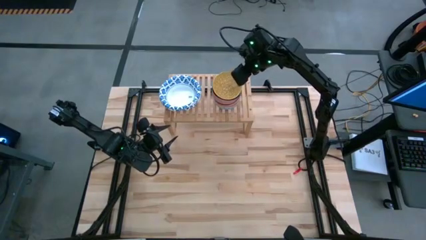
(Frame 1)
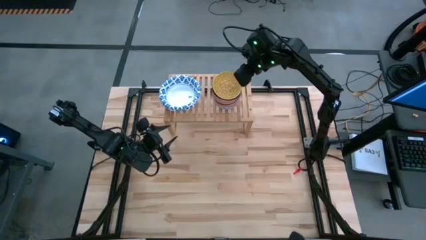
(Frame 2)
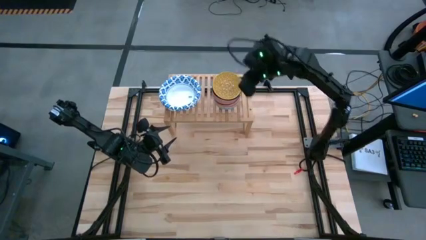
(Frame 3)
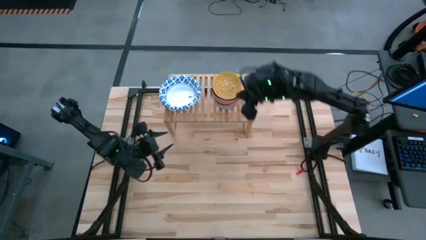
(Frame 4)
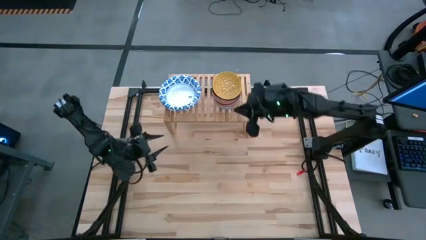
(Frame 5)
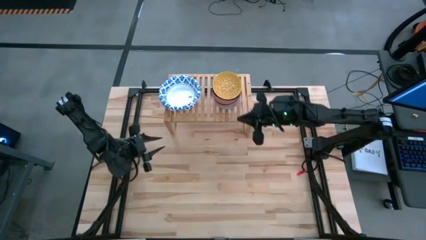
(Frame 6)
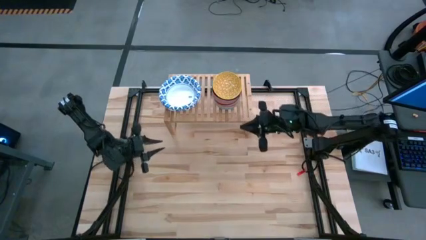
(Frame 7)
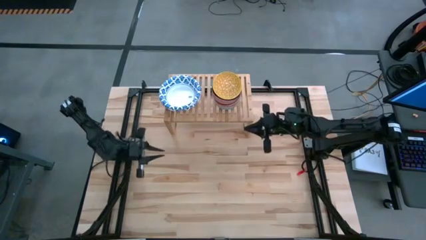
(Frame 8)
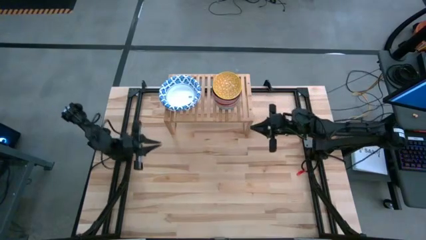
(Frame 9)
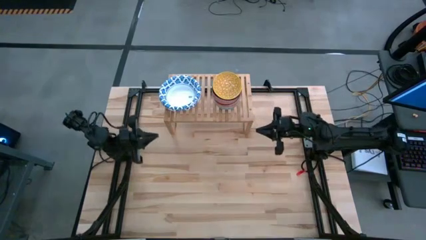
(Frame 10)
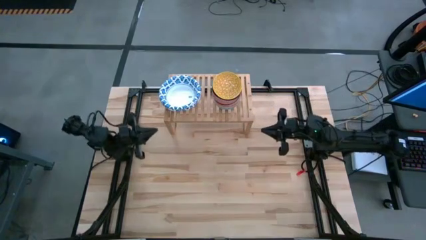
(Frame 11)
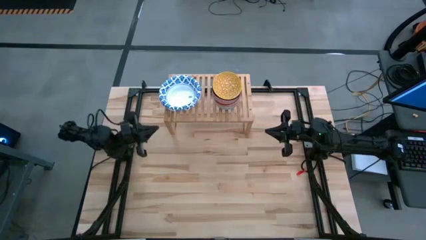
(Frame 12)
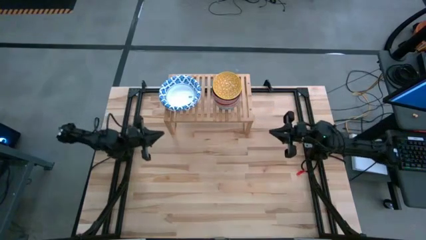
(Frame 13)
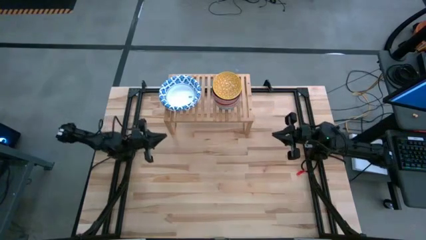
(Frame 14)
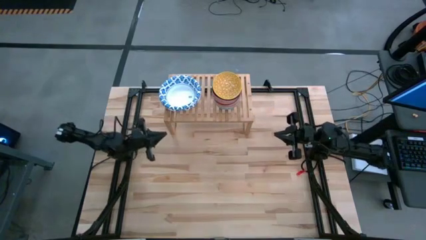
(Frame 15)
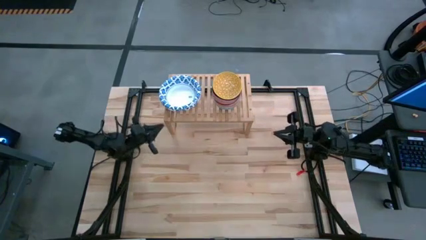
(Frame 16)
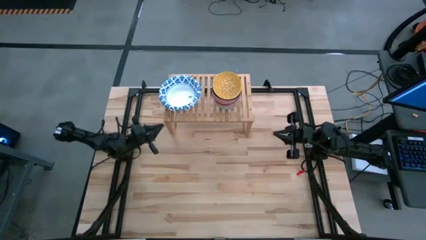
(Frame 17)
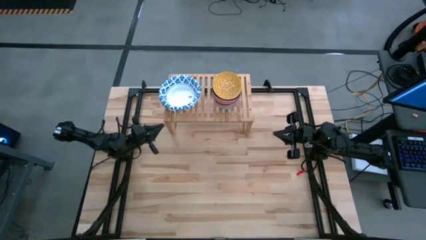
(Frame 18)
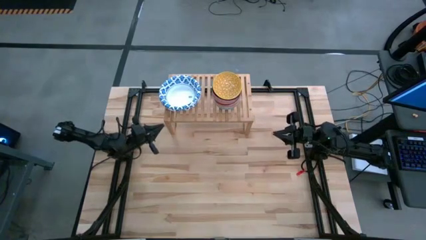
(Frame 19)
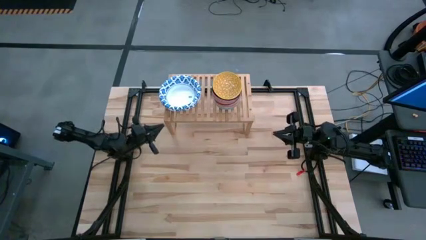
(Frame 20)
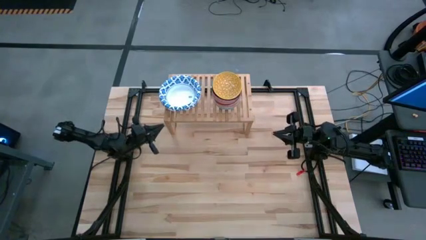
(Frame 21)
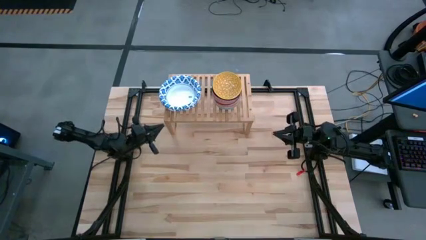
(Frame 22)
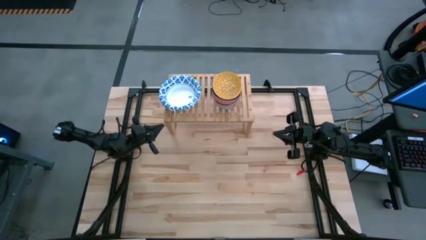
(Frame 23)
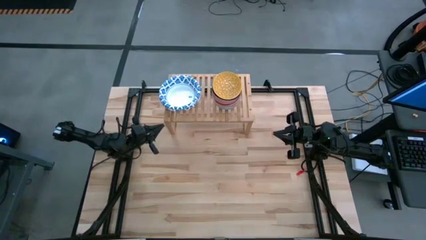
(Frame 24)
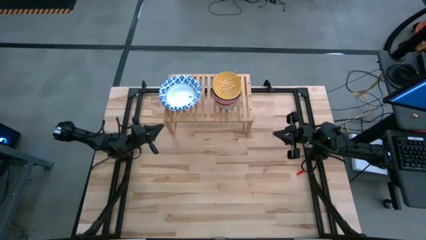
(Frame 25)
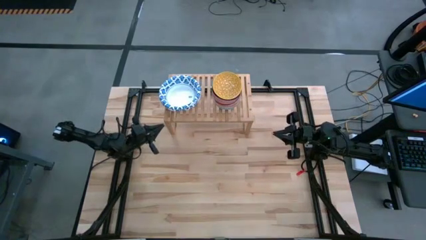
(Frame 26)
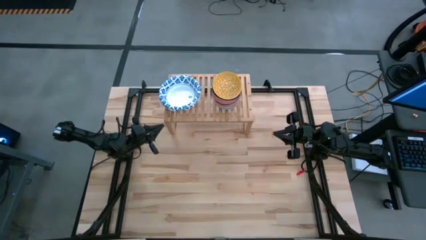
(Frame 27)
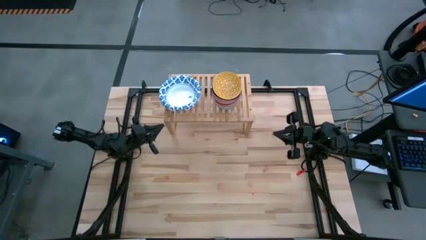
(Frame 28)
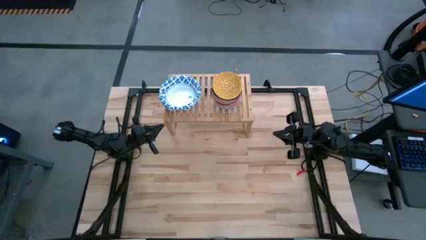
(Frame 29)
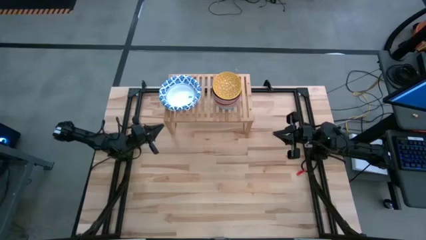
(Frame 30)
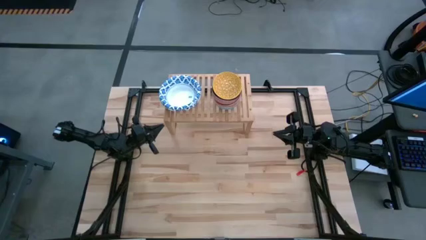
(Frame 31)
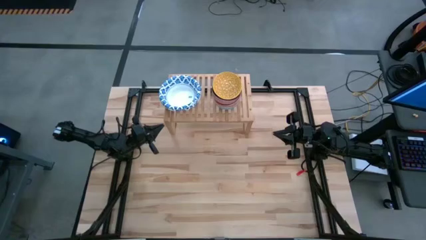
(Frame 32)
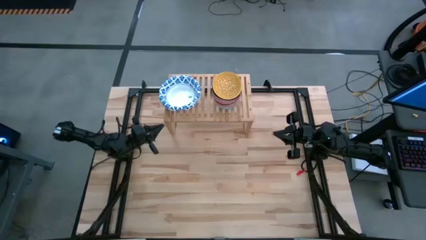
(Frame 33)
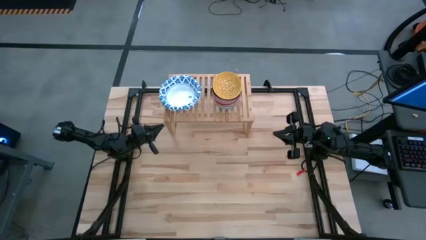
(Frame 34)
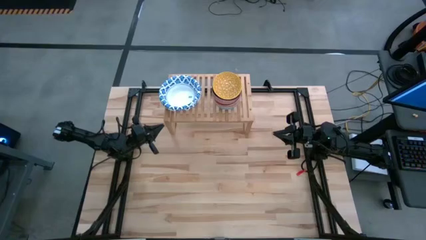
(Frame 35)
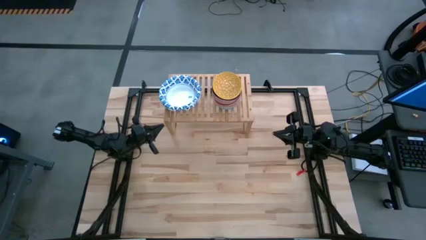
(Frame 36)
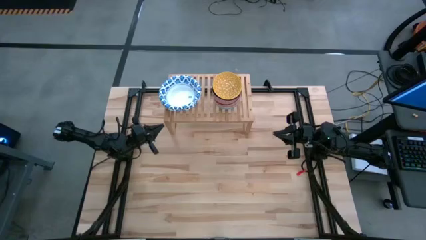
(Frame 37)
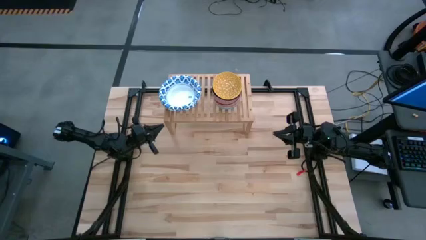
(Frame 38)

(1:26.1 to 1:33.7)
Task: Place and stack bowls onto a shelf
Return to Home Position

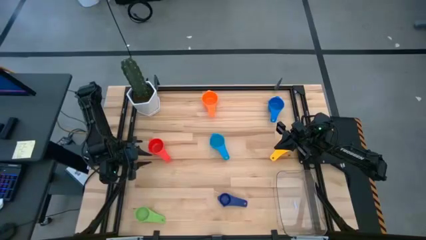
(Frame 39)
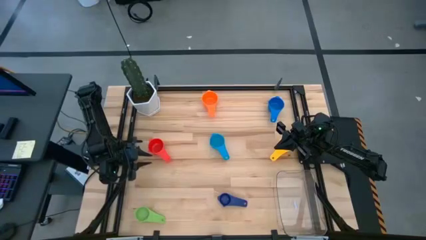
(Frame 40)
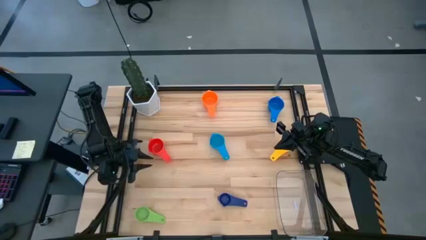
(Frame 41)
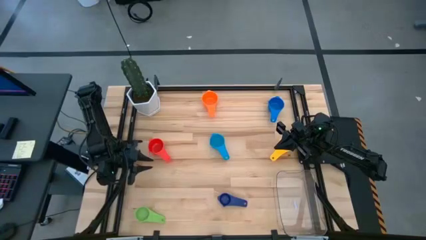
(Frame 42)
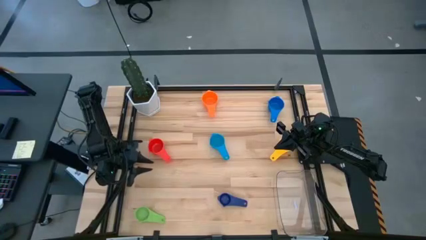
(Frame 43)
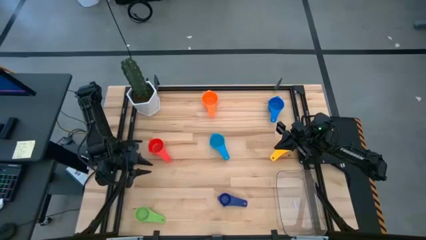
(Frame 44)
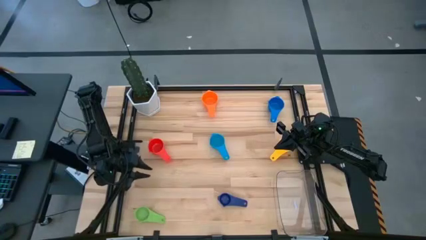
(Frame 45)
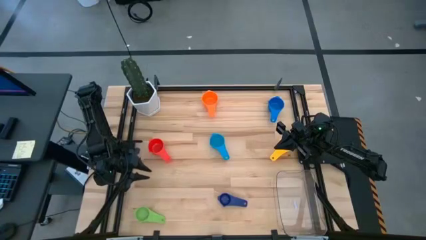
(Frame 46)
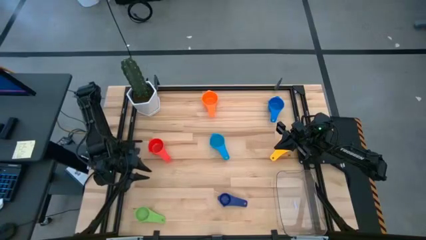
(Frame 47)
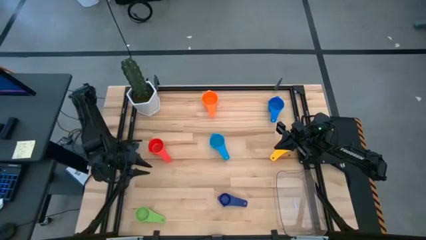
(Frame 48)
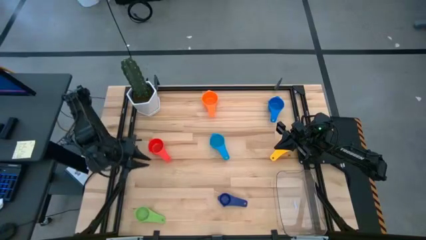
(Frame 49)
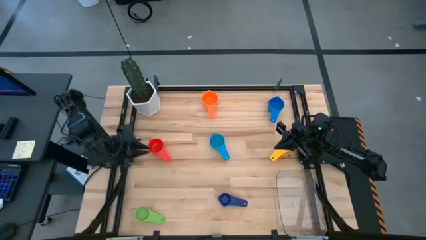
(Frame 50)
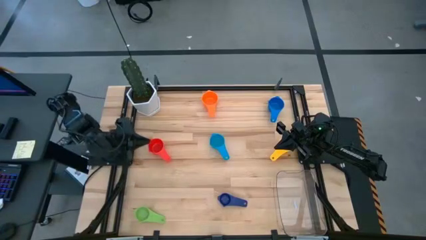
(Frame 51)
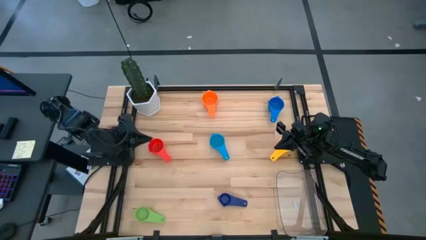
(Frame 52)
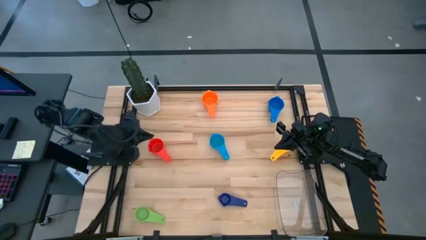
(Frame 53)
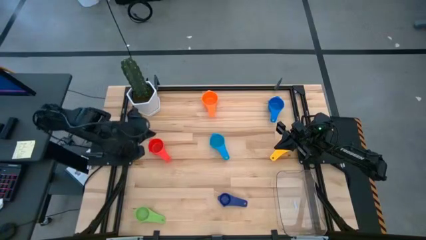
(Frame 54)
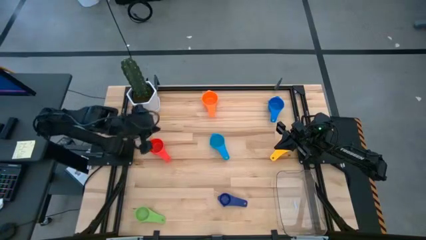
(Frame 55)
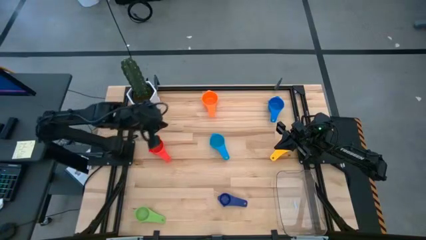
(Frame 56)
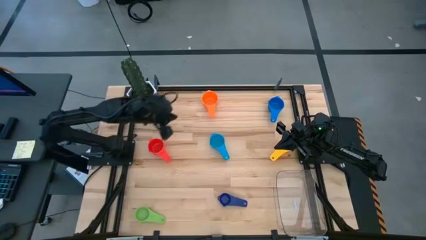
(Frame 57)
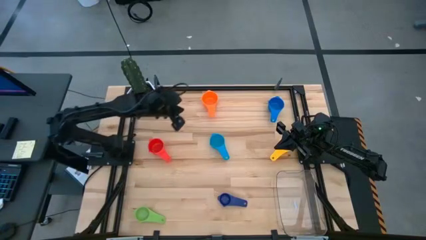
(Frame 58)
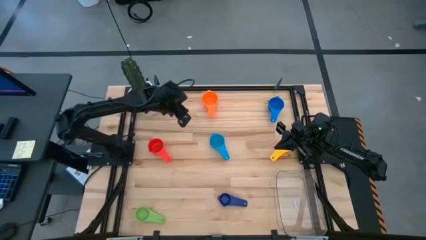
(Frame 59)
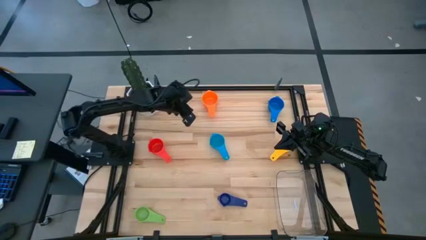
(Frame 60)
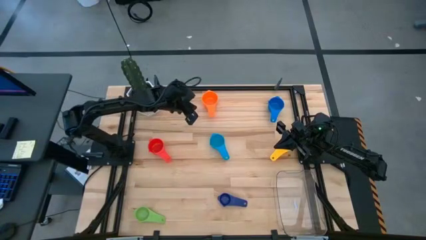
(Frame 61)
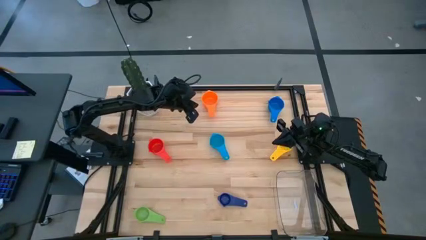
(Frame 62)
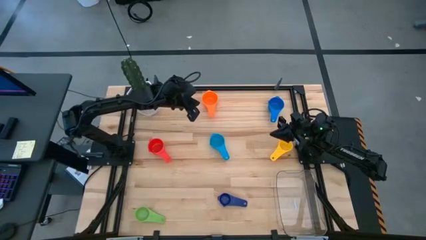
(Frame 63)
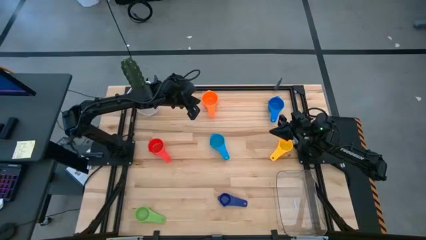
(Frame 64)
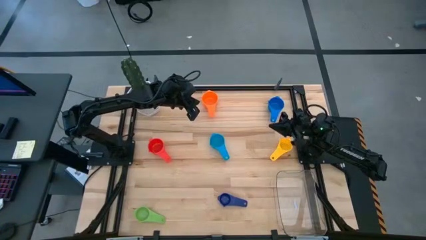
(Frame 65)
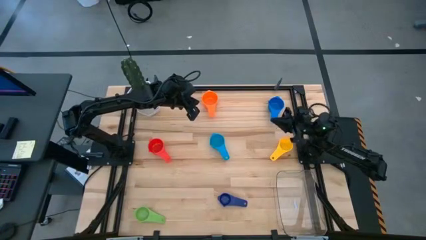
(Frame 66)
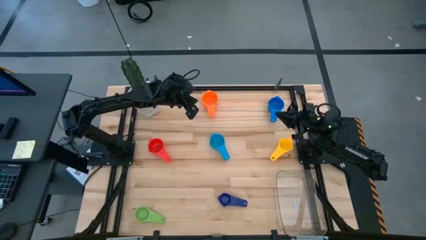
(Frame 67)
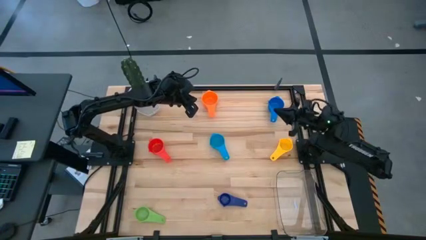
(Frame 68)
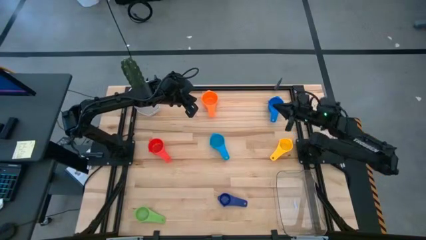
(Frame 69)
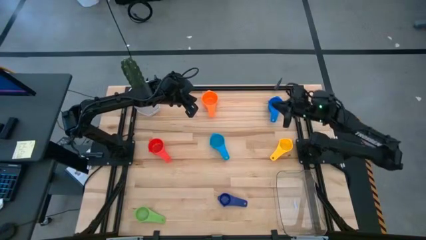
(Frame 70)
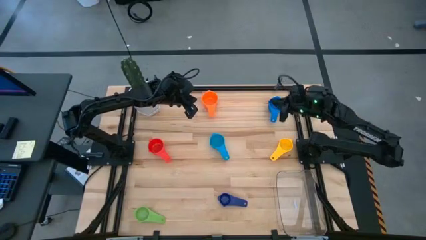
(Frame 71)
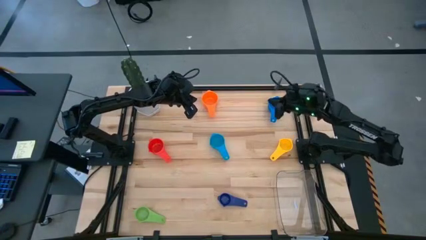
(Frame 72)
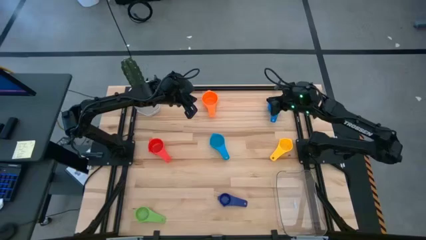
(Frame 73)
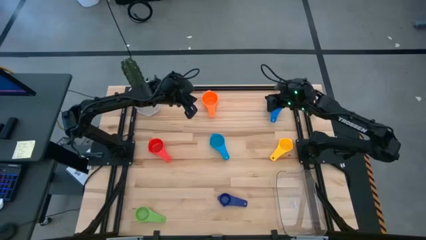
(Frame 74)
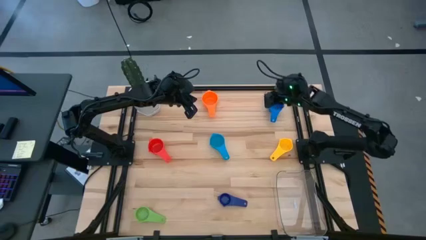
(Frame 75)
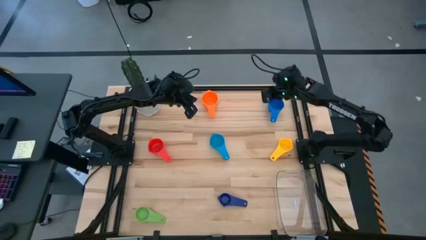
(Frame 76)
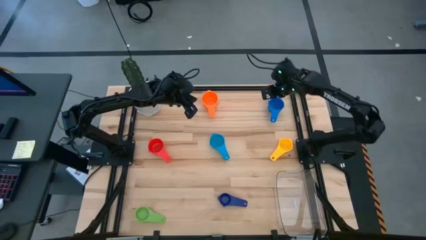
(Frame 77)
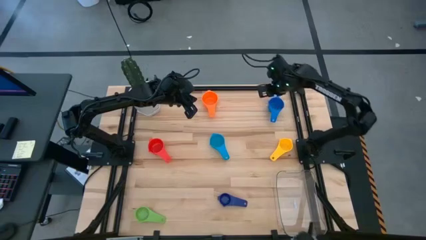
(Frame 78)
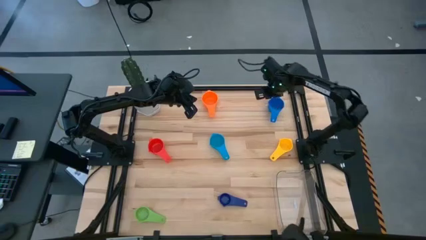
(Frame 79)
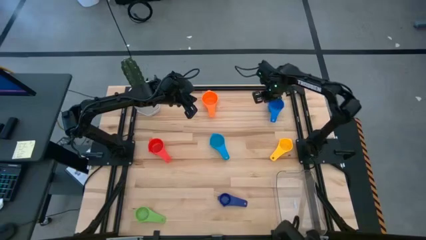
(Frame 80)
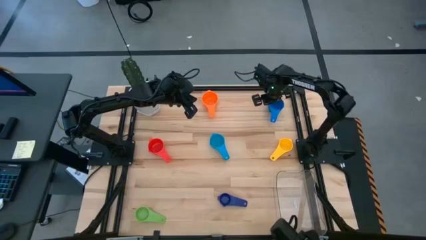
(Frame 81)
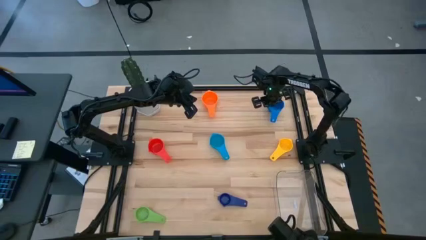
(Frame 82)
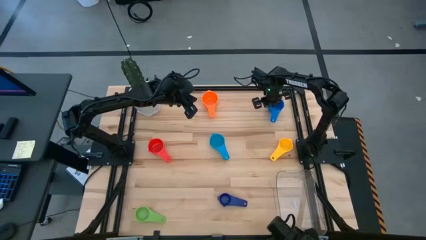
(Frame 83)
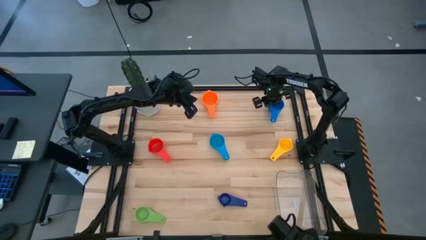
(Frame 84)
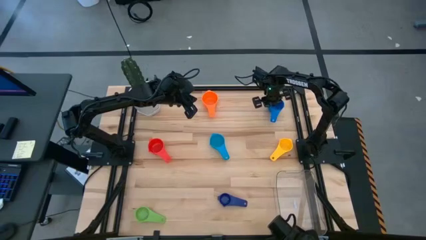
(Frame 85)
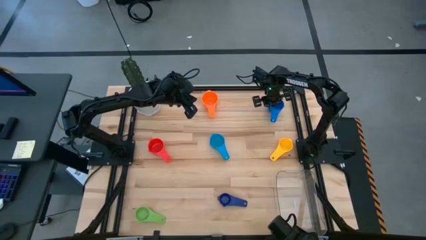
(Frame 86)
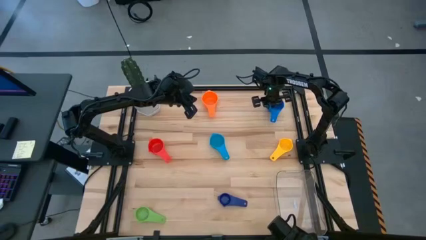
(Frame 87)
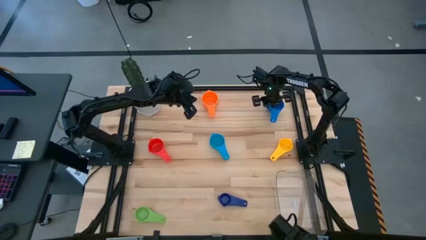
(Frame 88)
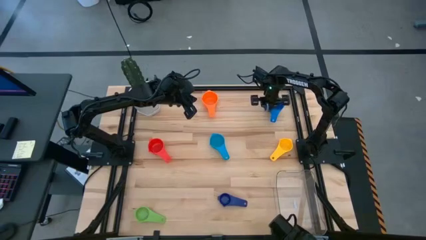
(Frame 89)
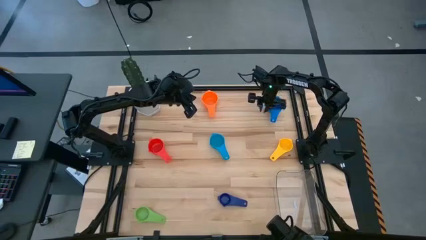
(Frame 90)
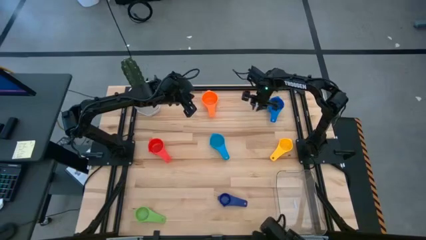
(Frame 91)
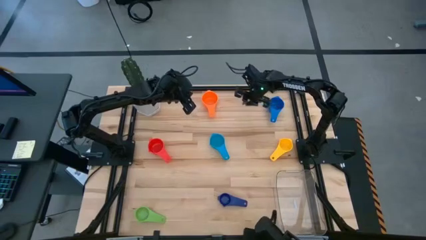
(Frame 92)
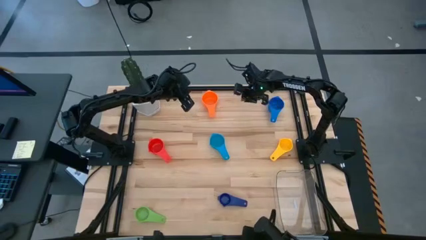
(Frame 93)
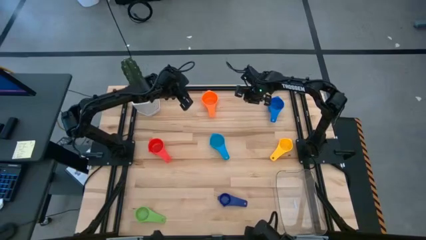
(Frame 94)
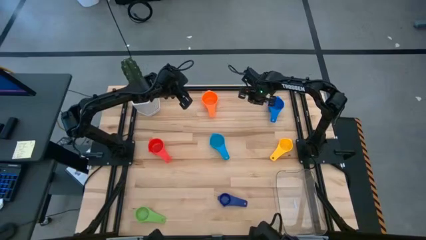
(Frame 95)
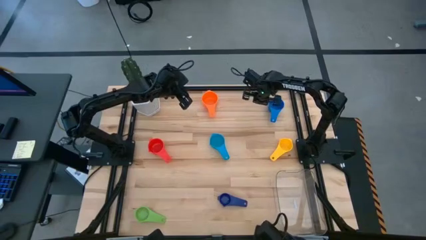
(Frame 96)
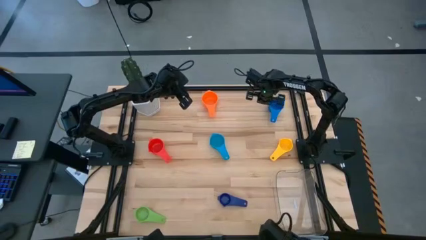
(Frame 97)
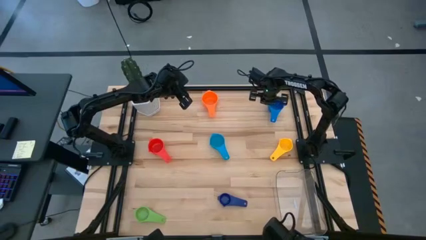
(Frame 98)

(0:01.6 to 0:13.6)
Task: Nest measuring cups in basket
Adjust the orange measuring cup
